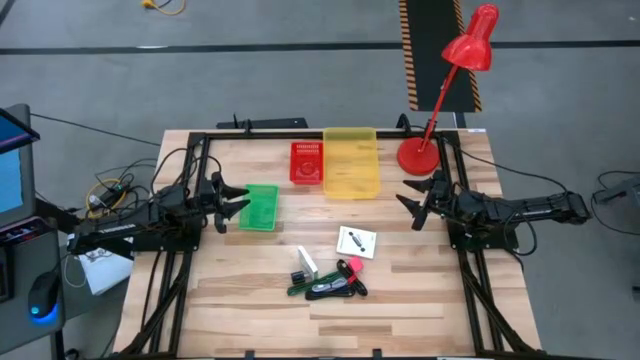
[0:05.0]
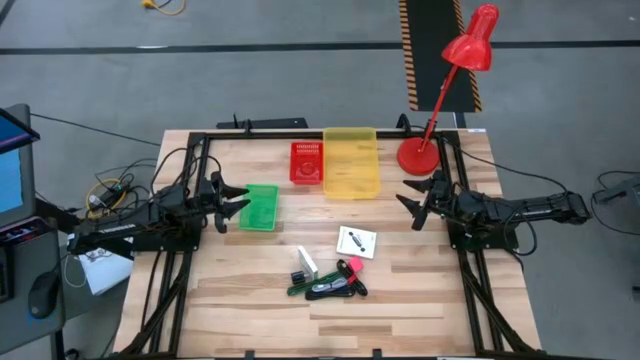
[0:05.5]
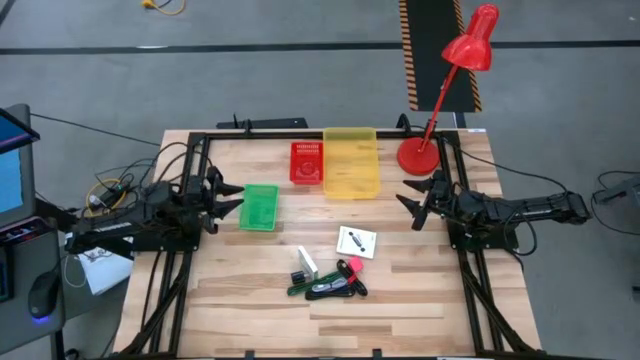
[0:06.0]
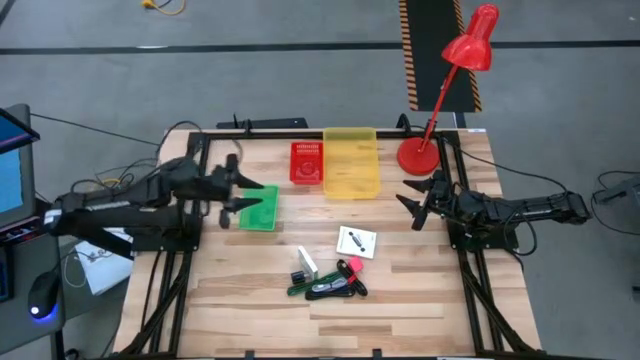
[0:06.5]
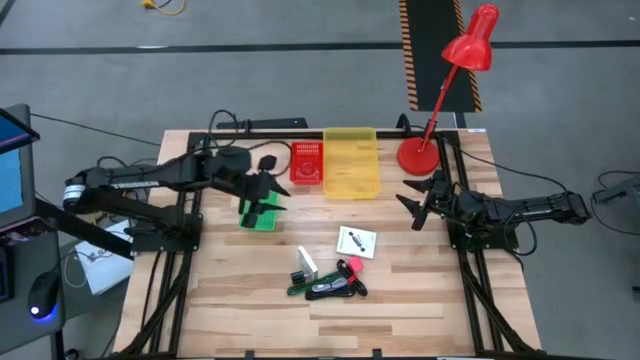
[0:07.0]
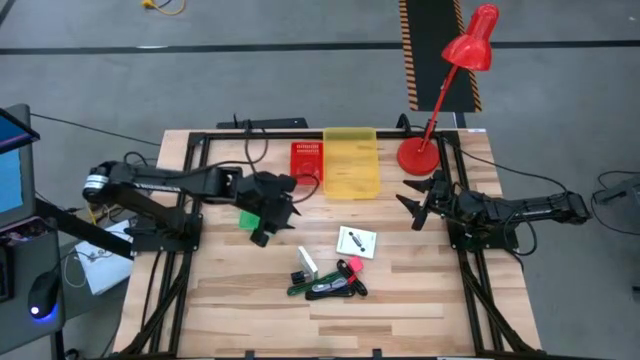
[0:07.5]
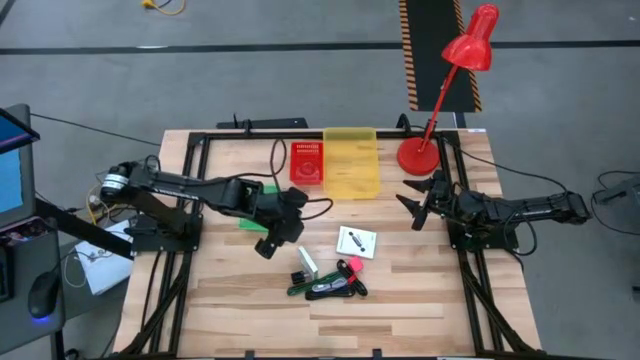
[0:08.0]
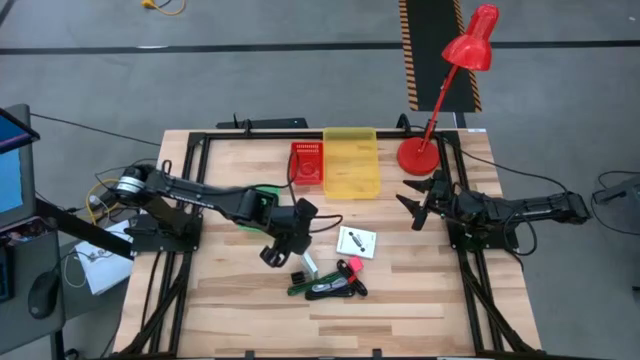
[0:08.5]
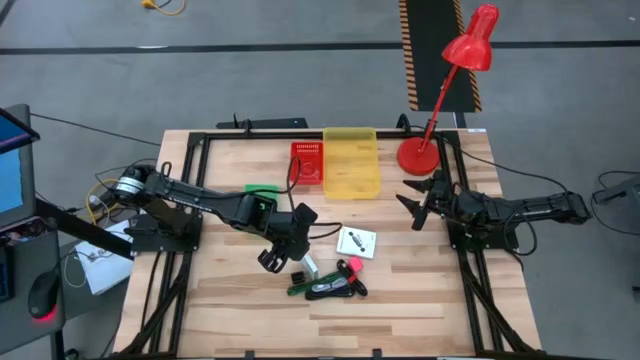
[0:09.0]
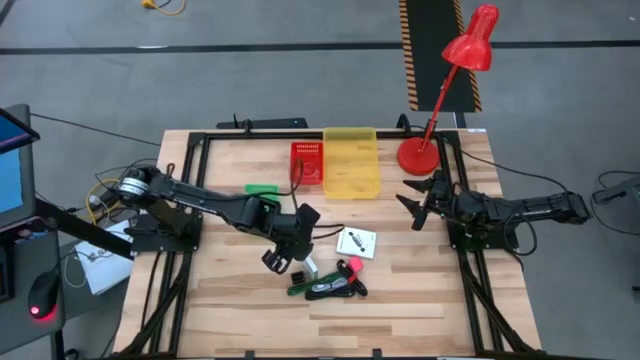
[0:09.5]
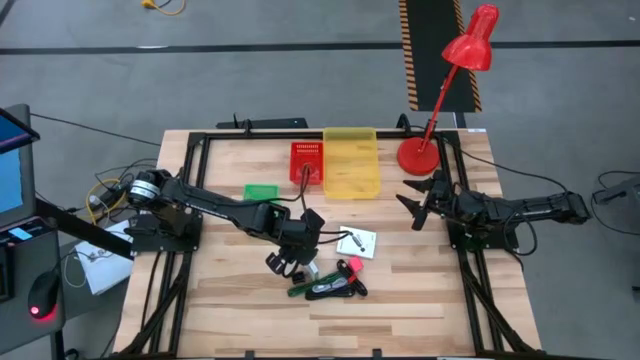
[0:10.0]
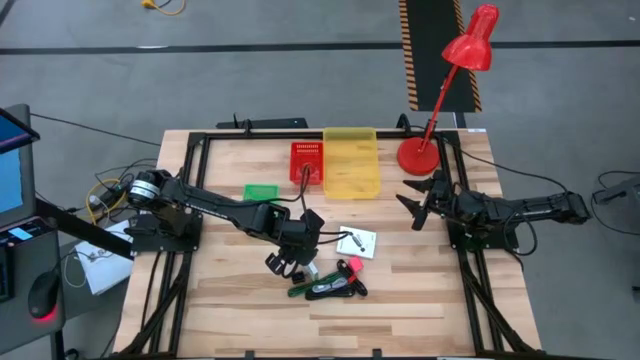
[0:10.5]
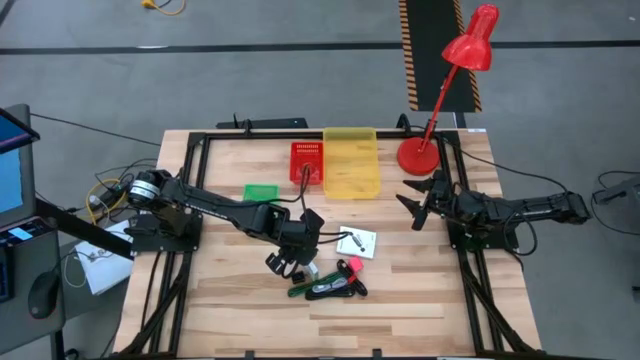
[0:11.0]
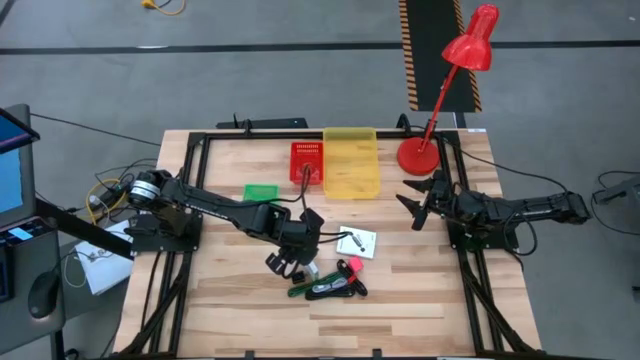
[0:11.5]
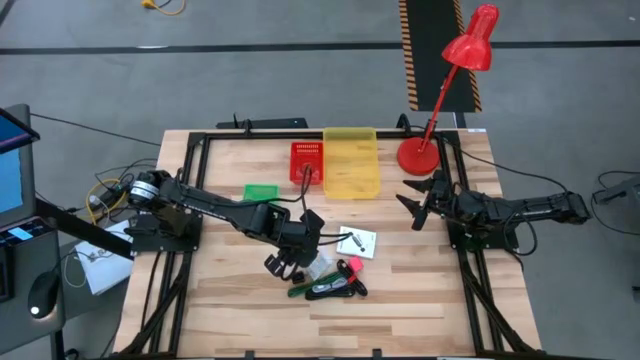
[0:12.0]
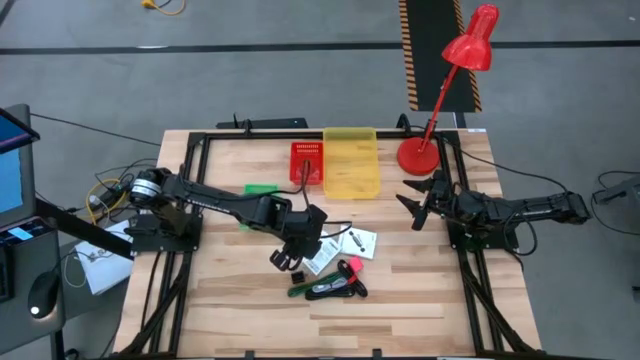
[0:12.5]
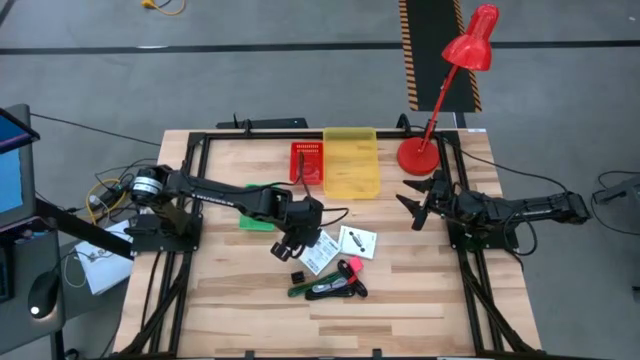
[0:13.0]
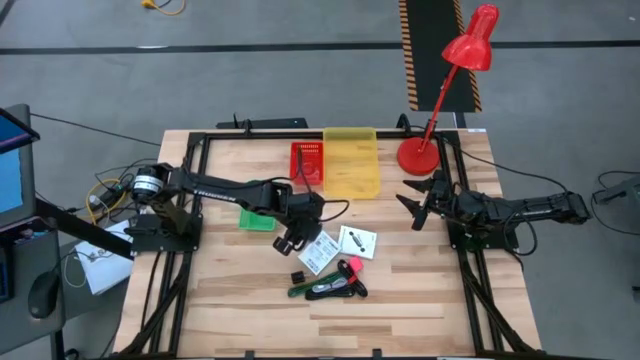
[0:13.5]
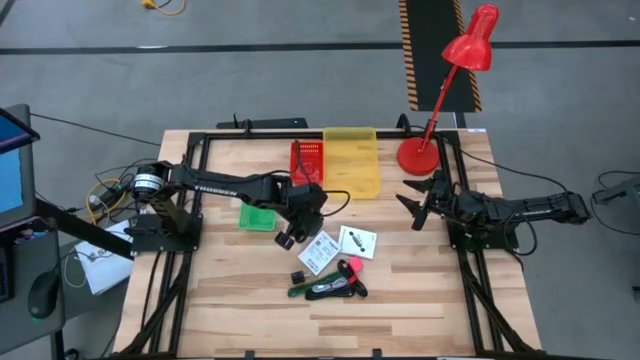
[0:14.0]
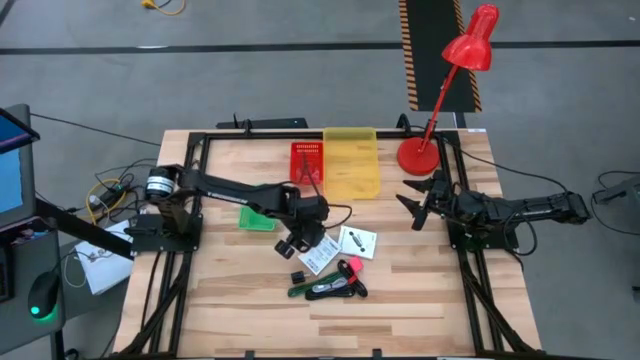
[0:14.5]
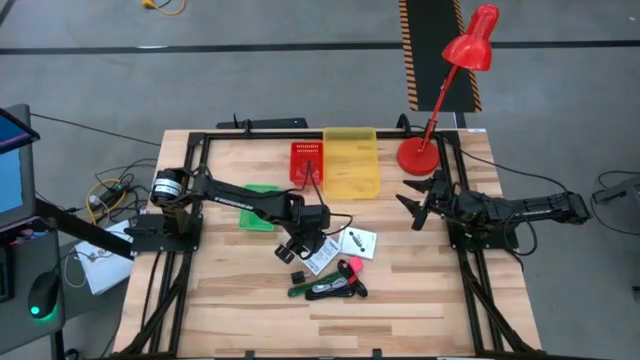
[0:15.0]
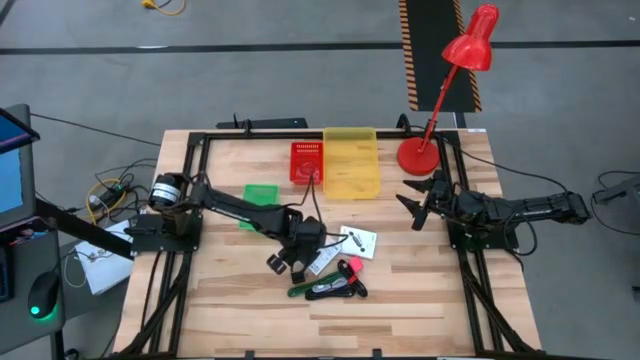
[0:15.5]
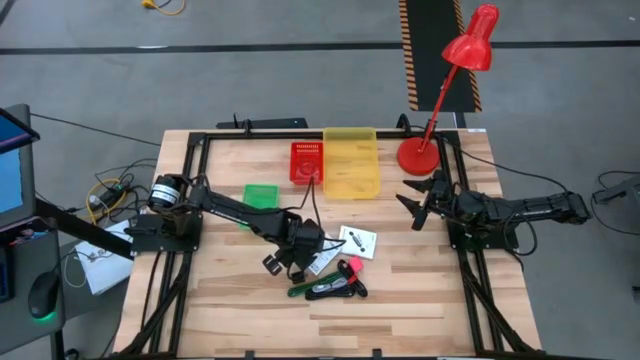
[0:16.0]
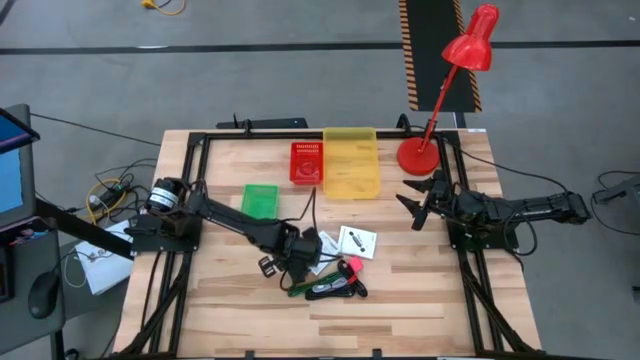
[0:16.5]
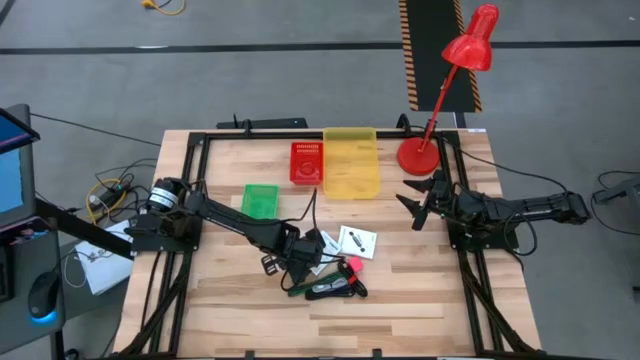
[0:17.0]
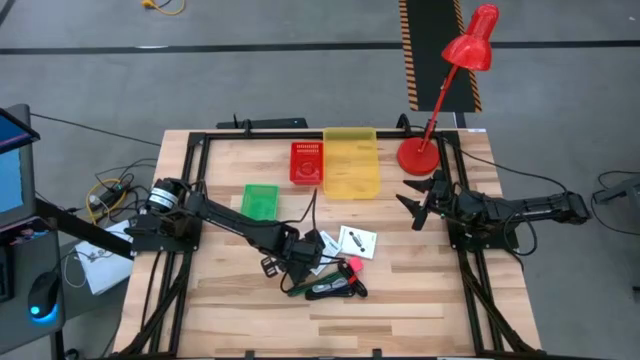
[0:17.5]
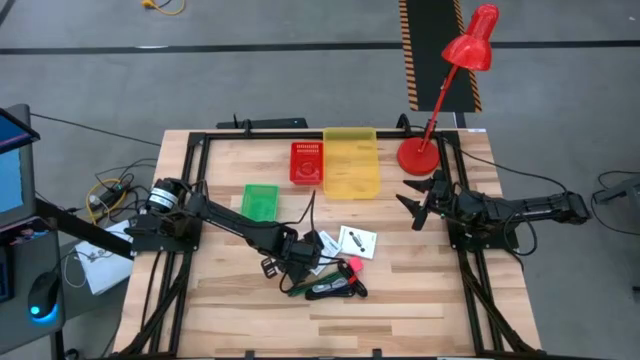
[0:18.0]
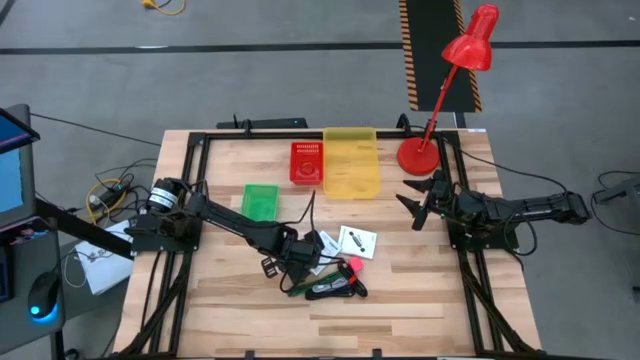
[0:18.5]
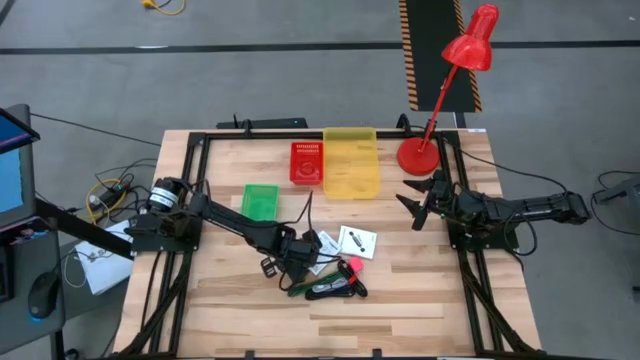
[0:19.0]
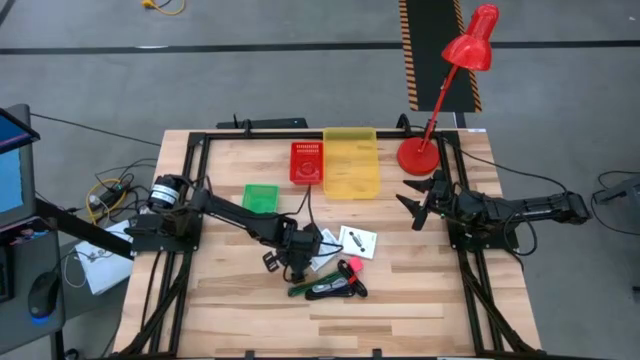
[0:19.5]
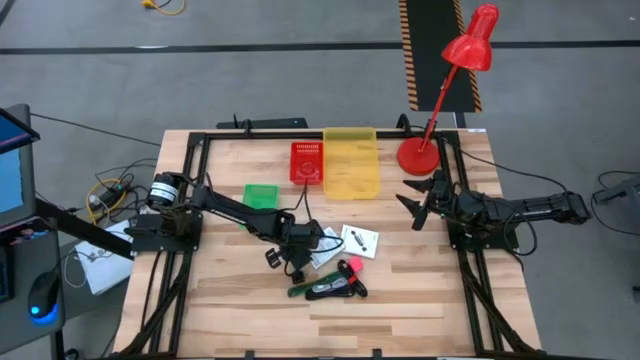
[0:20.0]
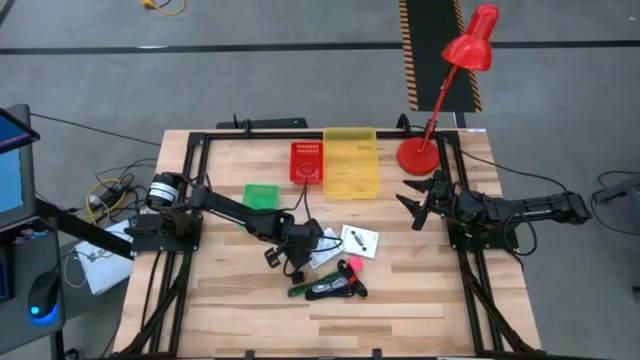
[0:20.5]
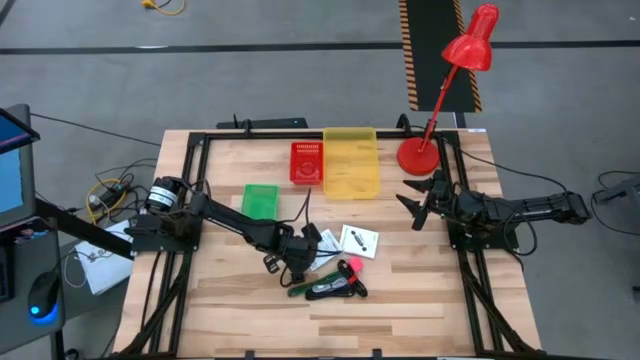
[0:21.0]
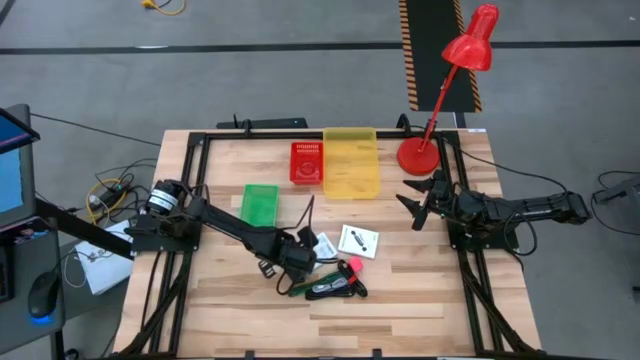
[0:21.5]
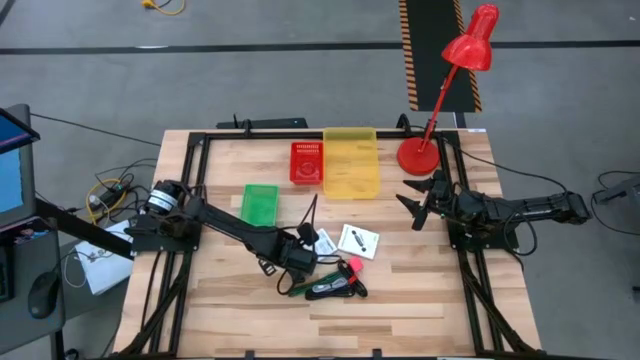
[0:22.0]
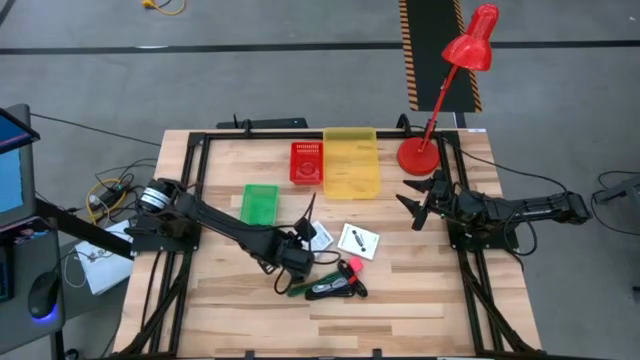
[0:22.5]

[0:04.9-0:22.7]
Task: Pick and place items into bin
Put the left white card reader box into the green basket
